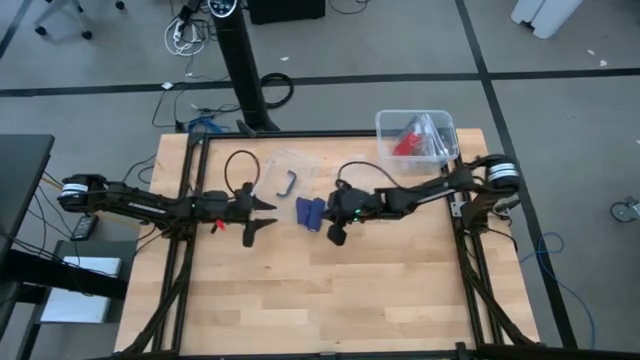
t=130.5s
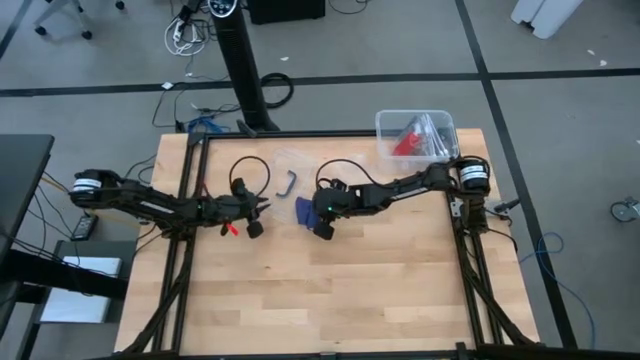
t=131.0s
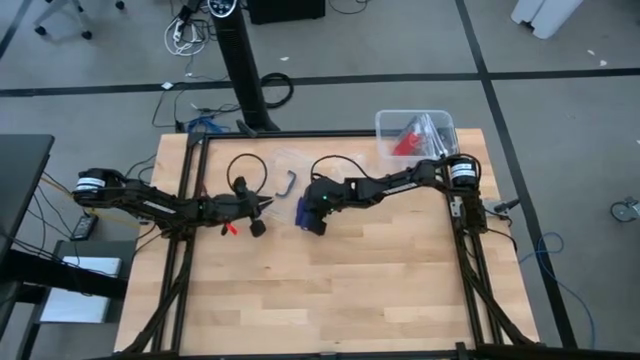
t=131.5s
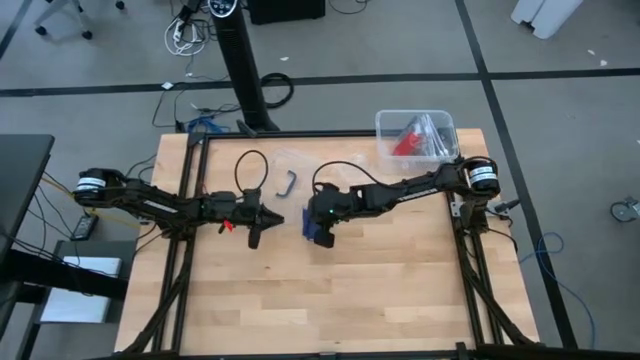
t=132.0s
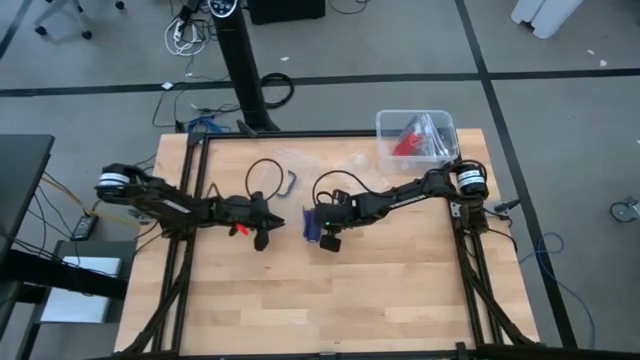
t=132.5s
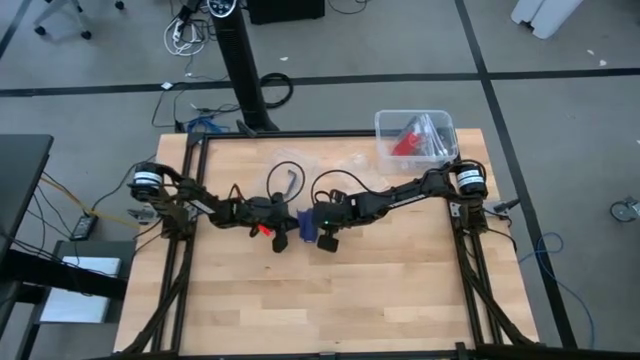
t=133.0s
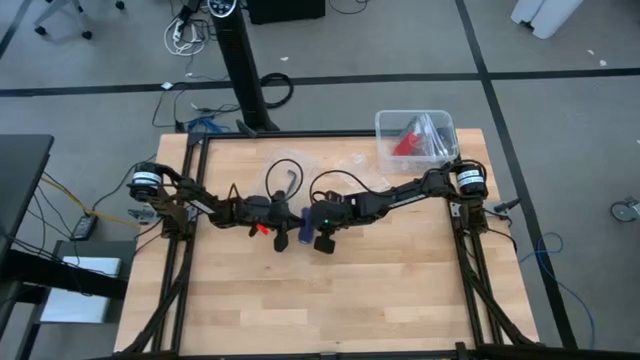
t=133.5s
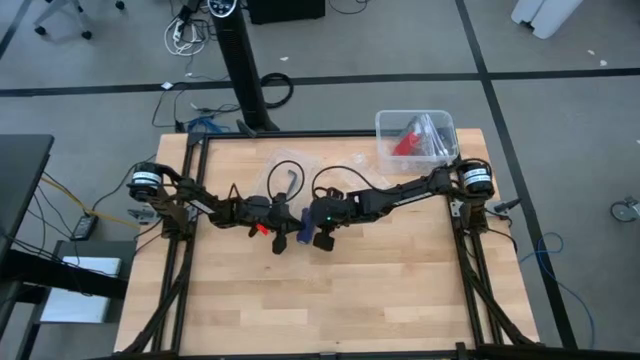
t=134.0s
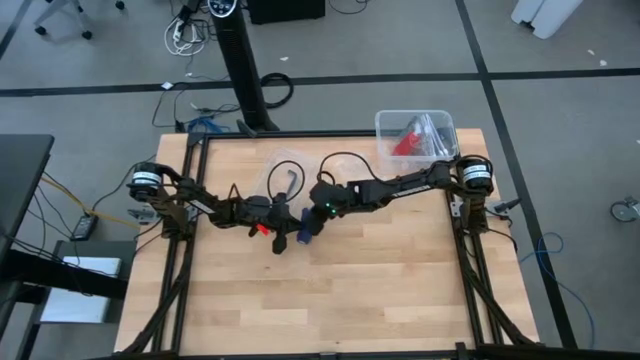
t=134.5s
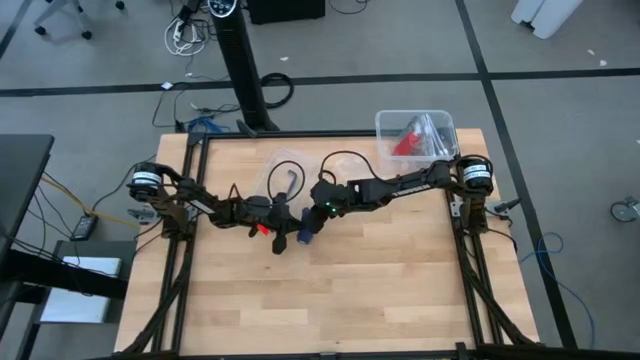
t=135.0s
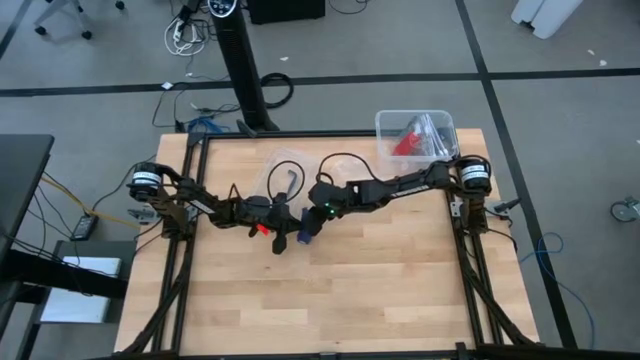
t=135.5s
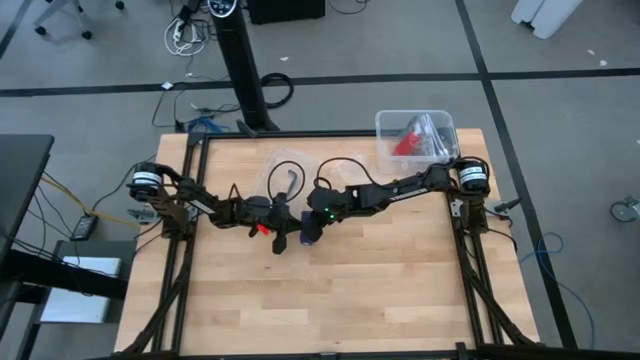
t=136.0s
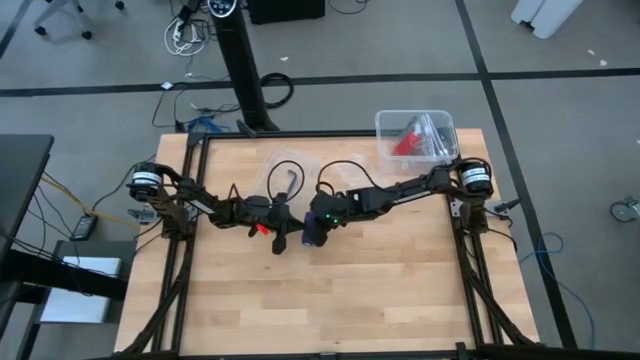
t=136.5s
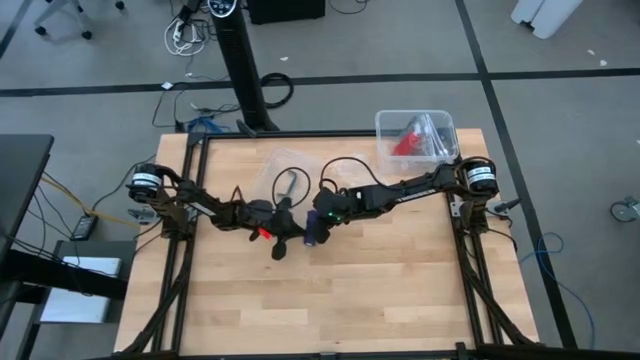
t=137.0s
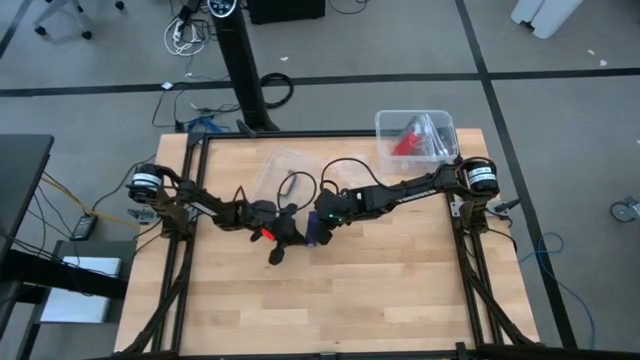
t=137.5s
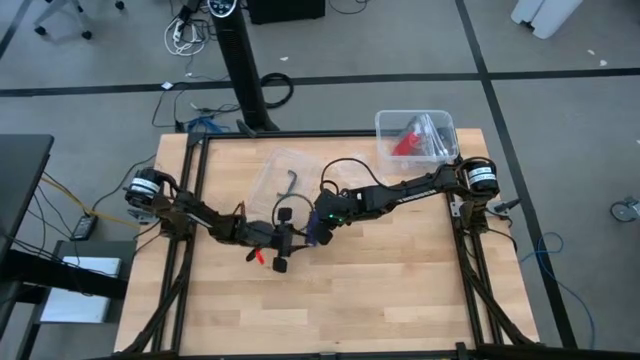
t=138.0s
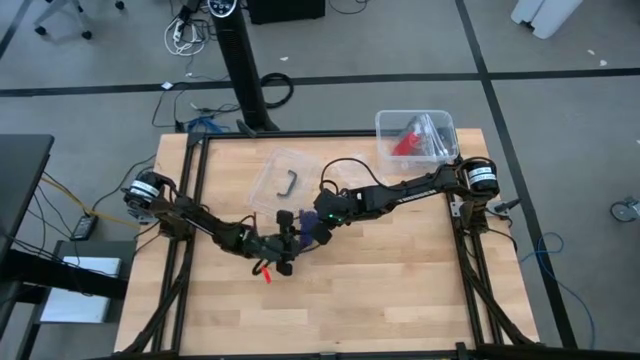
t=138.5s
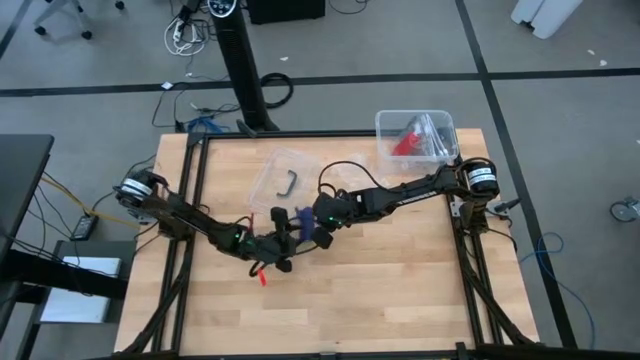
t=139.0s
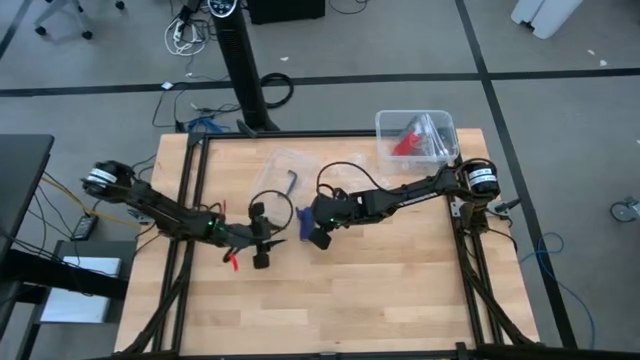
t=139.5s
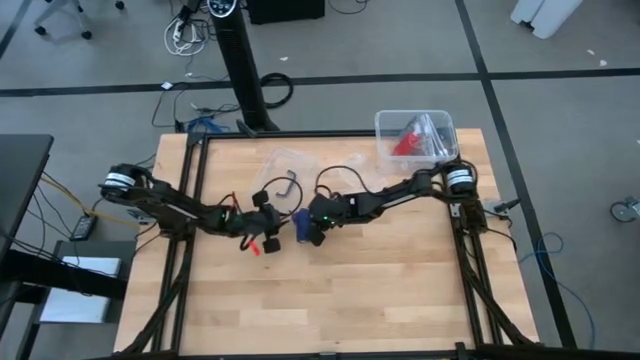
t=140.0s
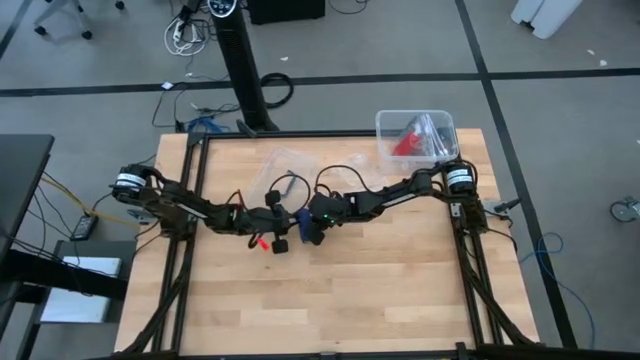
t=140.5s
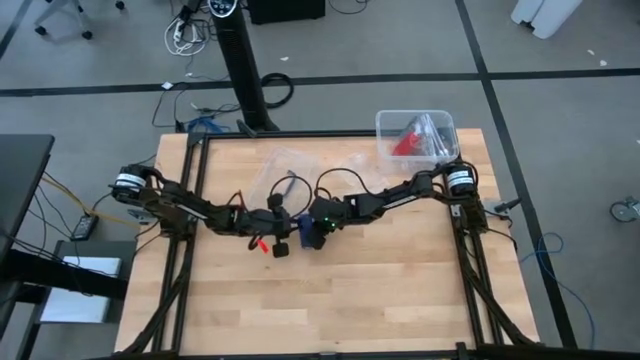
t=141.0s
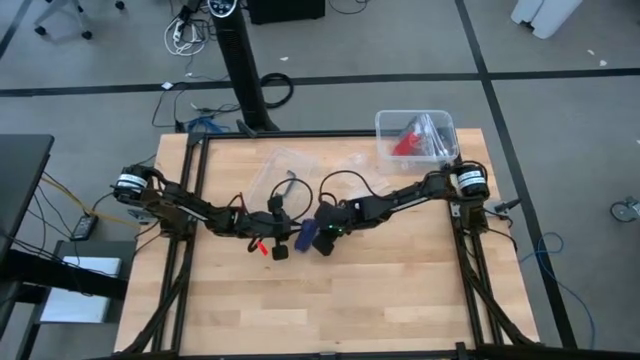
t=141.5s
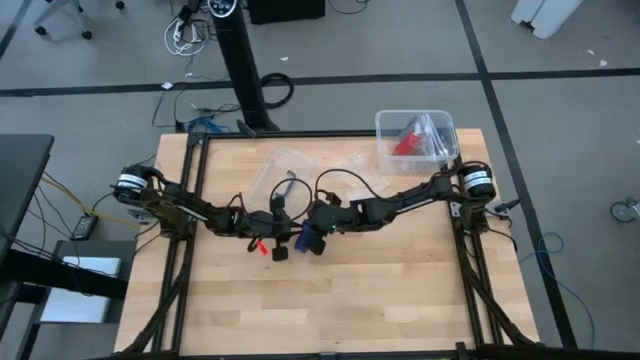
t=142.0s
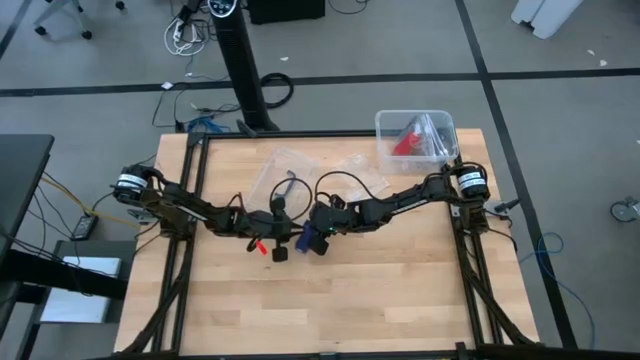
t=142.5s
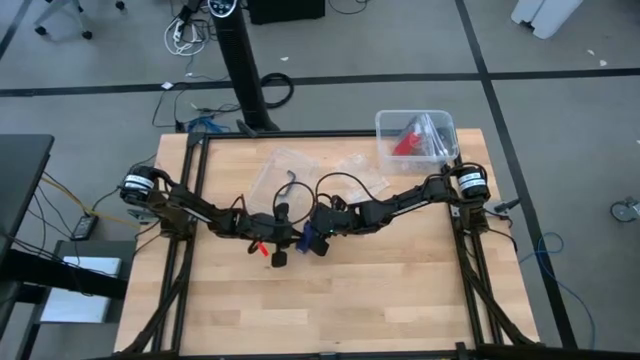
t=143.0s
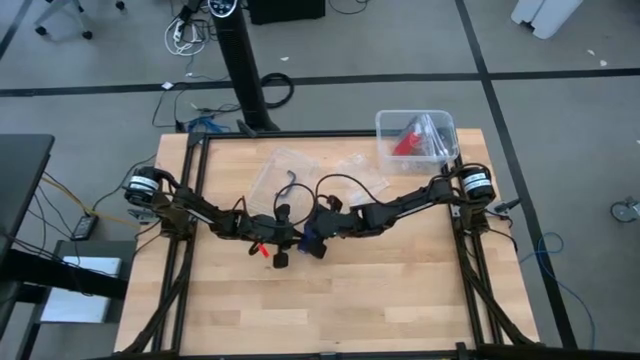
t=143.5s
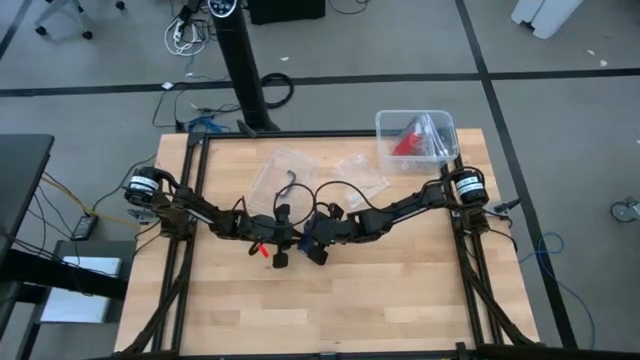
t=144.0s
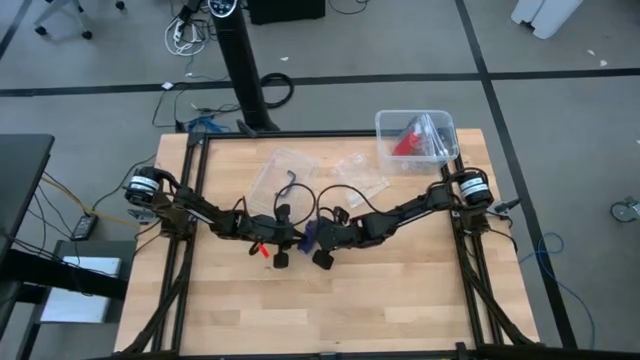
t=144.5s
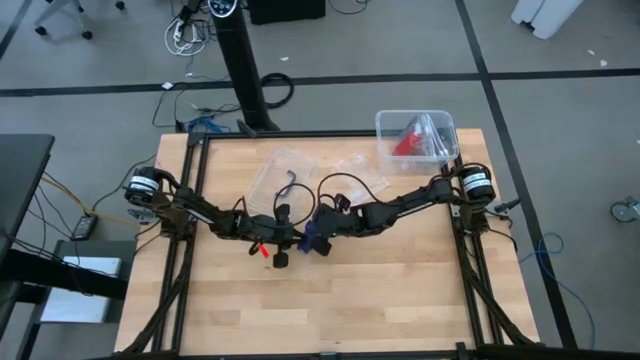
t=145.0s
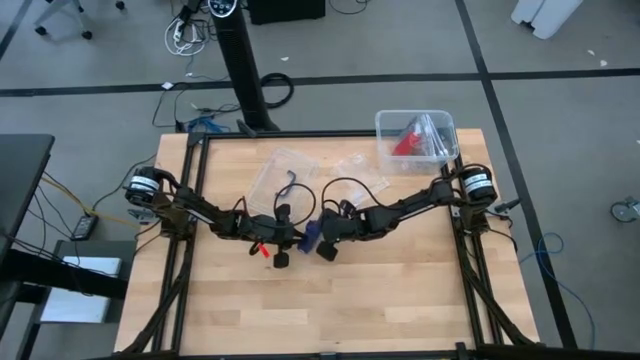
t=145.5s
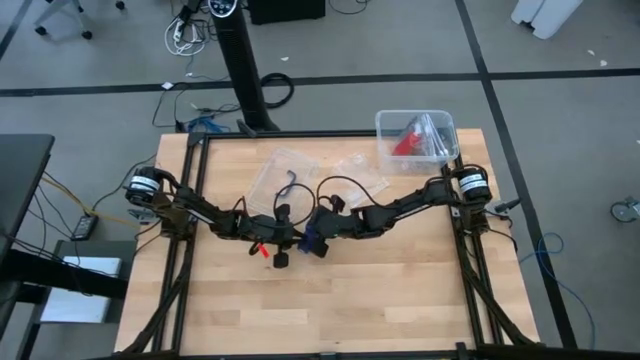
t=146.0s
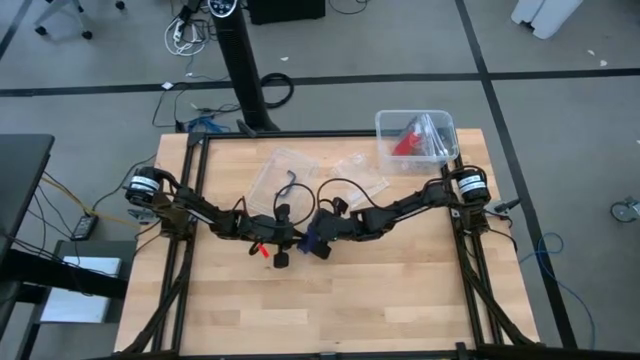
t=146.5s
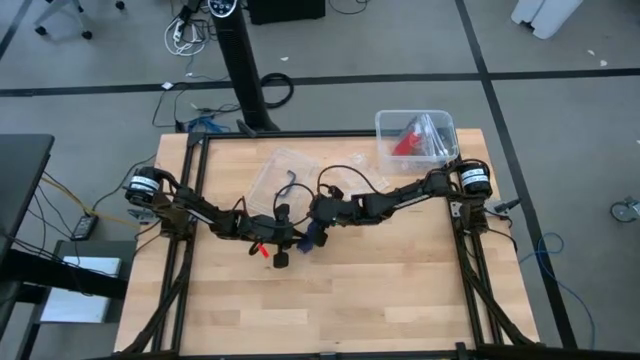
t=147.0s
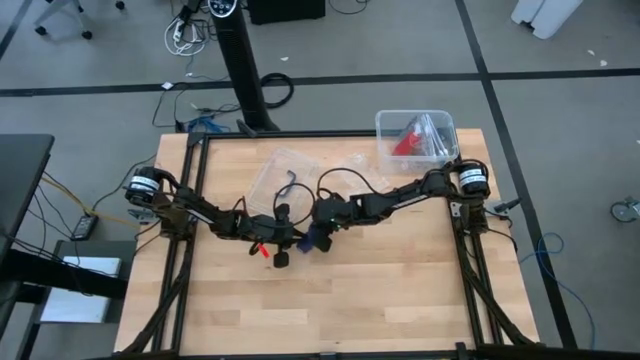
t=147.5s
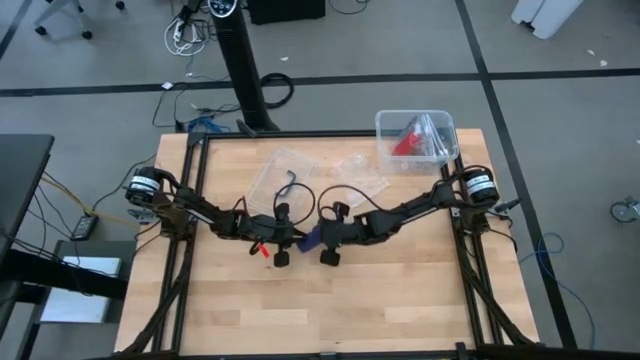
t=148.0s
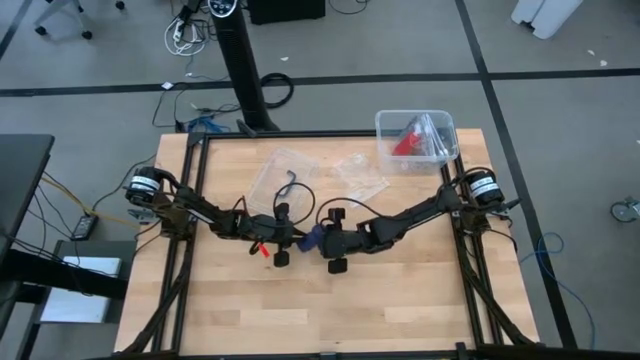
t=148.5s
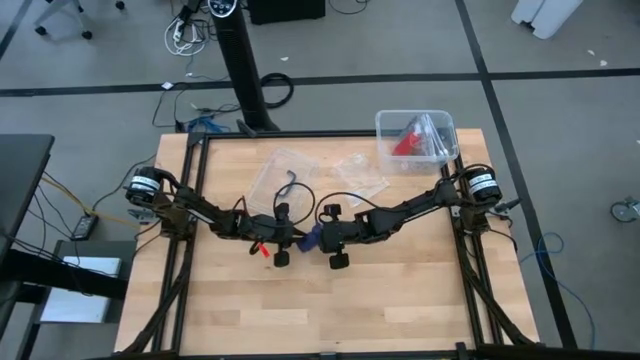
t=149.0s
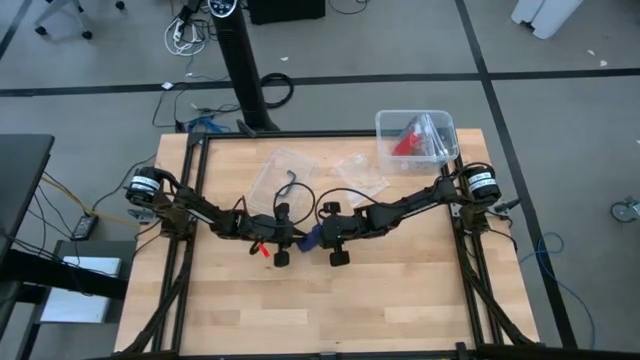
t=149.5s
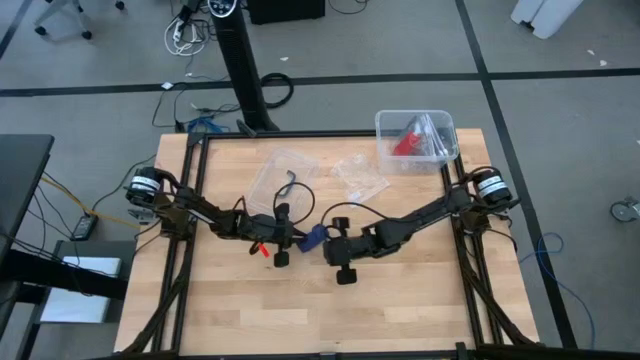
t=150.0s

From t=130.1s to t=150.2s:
Task: Roll bandage
Roll the blue bandage
